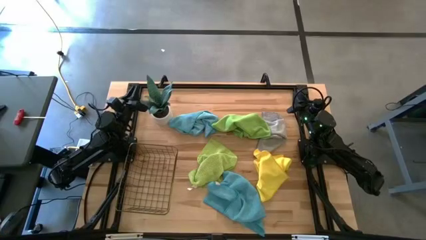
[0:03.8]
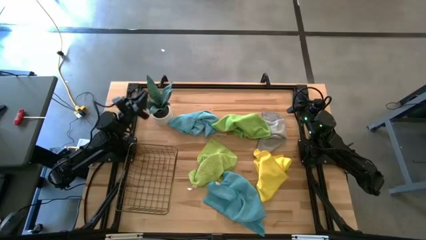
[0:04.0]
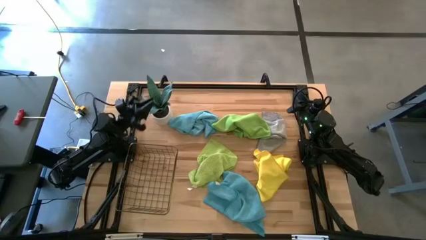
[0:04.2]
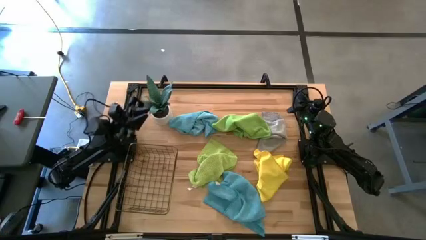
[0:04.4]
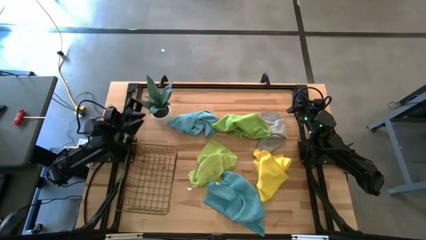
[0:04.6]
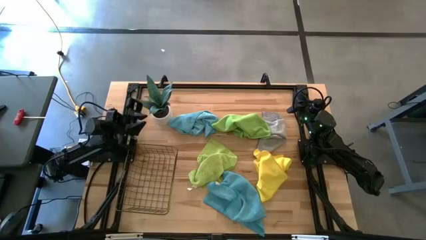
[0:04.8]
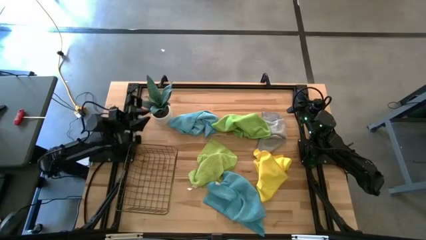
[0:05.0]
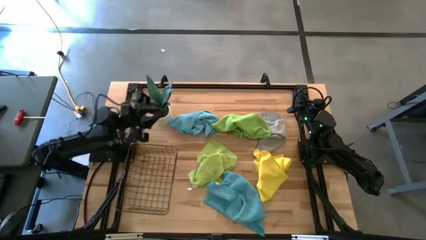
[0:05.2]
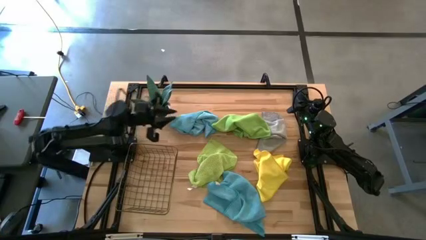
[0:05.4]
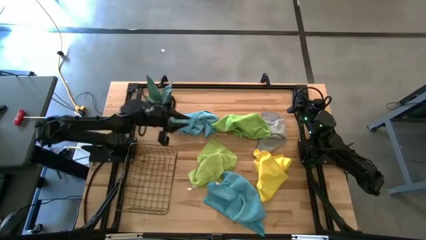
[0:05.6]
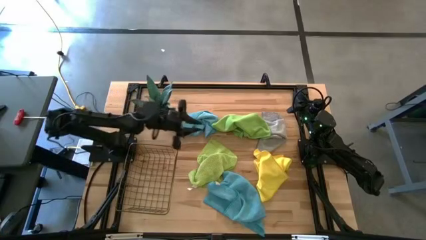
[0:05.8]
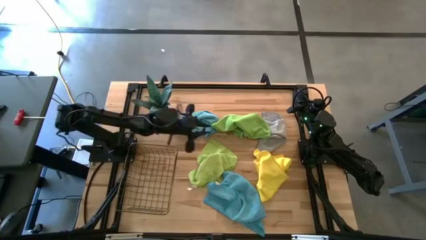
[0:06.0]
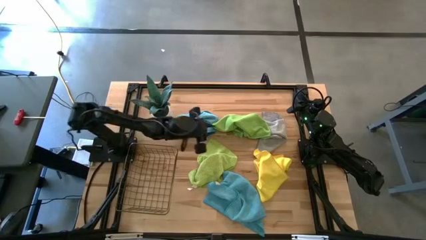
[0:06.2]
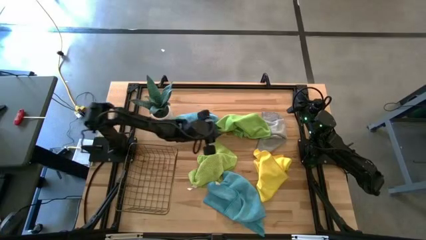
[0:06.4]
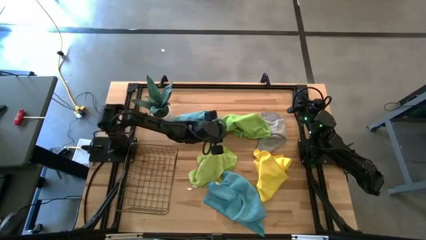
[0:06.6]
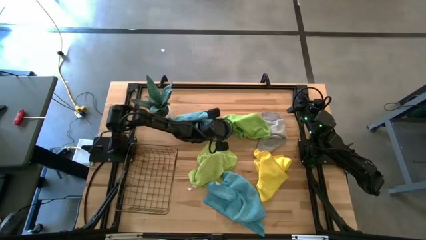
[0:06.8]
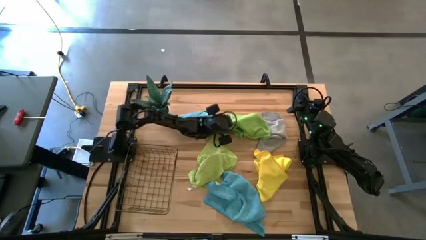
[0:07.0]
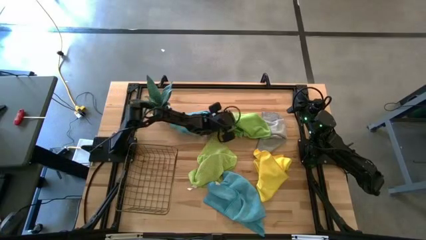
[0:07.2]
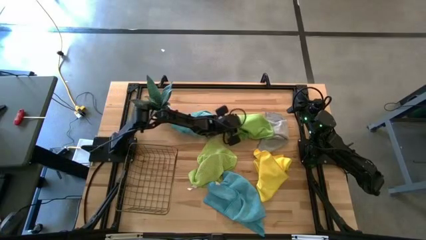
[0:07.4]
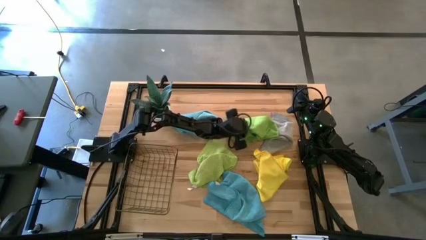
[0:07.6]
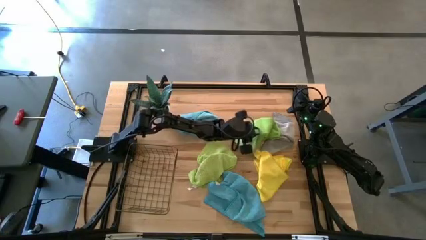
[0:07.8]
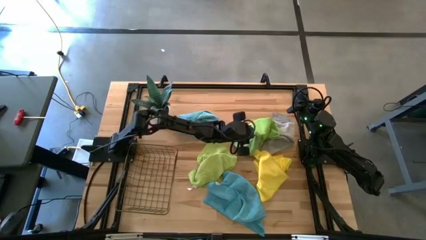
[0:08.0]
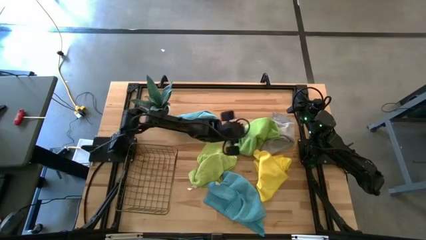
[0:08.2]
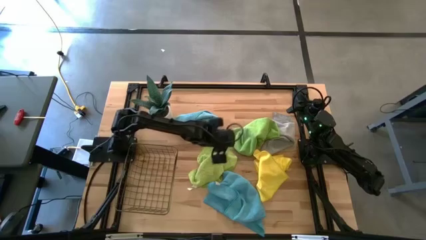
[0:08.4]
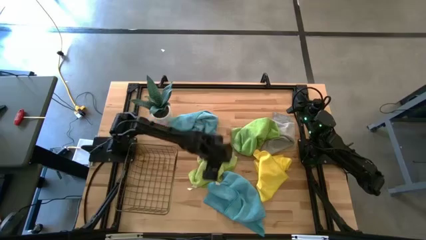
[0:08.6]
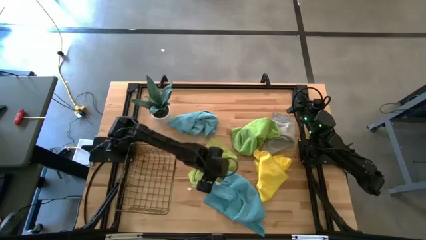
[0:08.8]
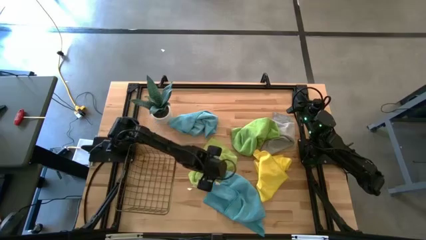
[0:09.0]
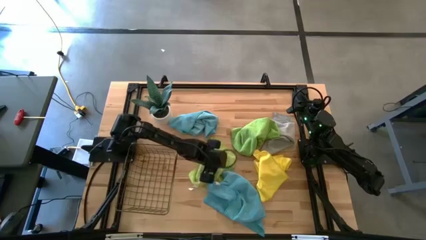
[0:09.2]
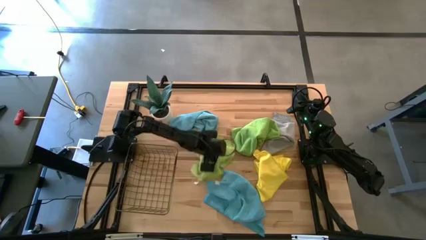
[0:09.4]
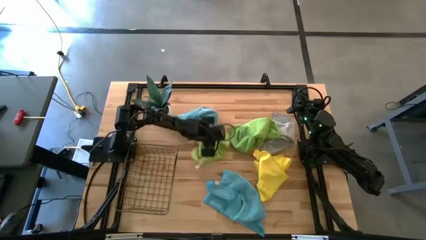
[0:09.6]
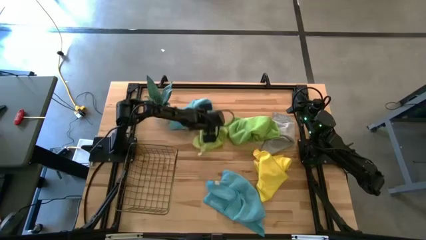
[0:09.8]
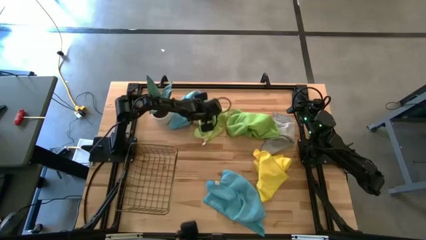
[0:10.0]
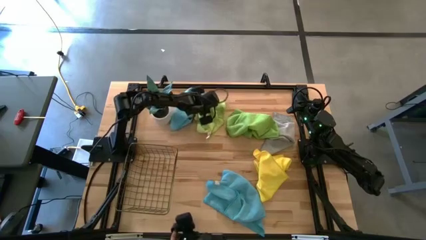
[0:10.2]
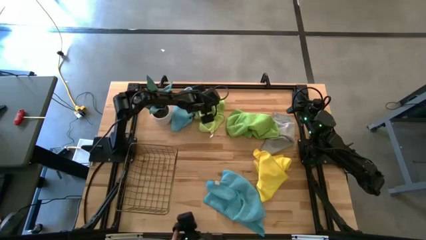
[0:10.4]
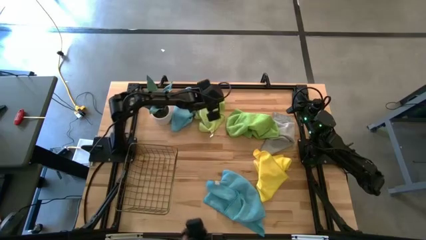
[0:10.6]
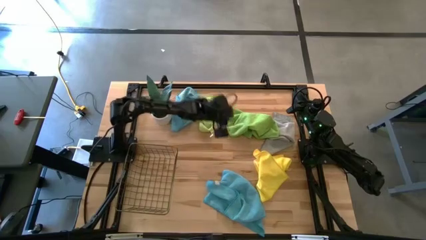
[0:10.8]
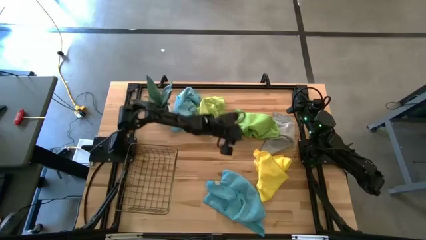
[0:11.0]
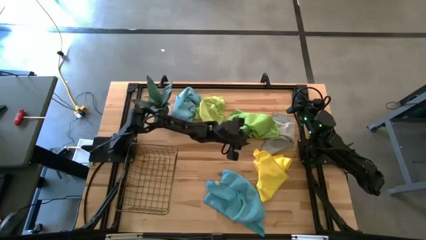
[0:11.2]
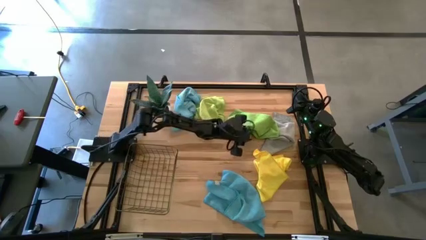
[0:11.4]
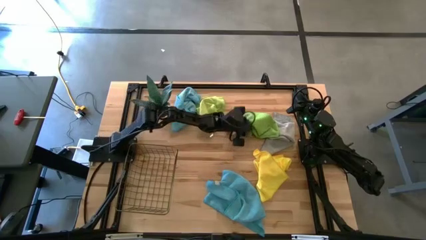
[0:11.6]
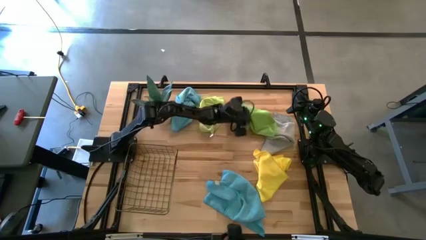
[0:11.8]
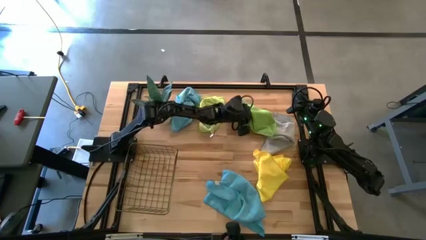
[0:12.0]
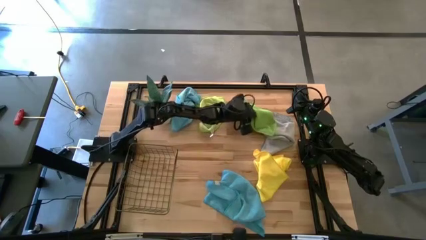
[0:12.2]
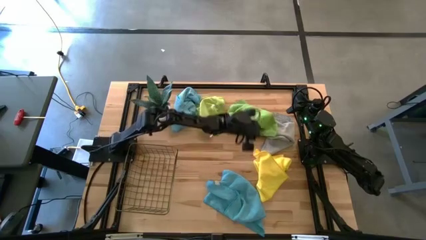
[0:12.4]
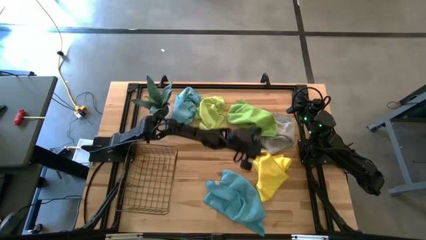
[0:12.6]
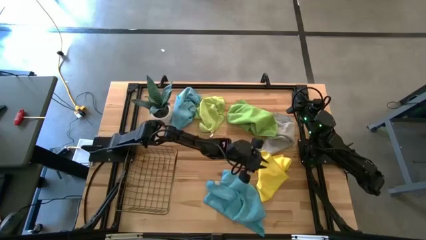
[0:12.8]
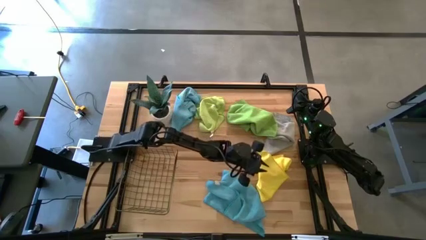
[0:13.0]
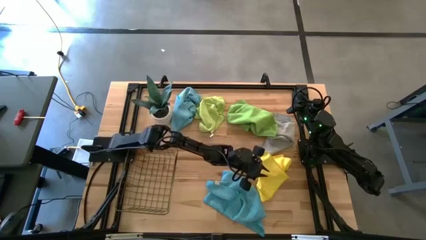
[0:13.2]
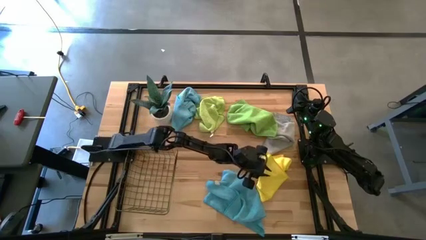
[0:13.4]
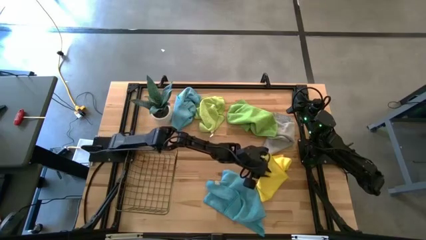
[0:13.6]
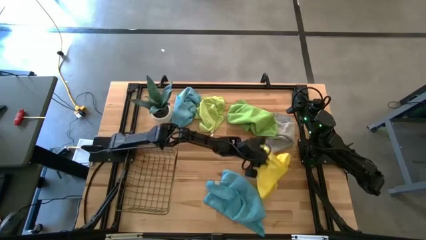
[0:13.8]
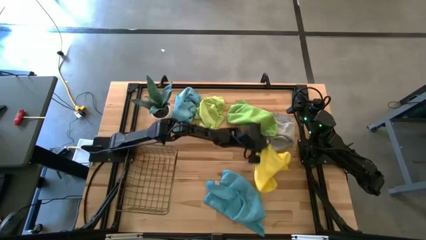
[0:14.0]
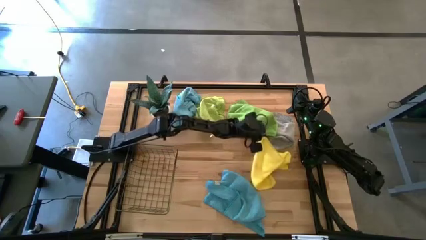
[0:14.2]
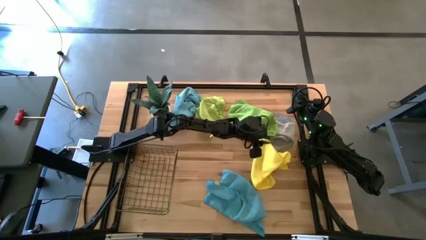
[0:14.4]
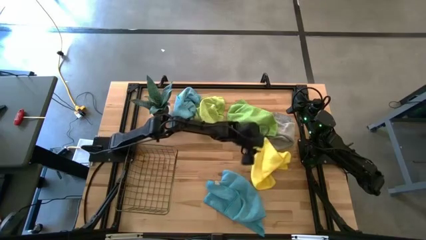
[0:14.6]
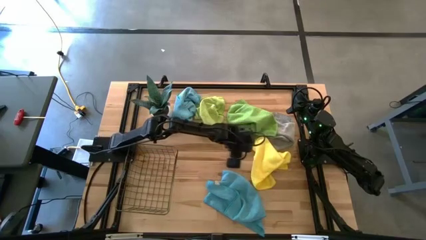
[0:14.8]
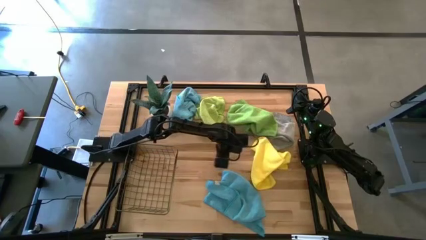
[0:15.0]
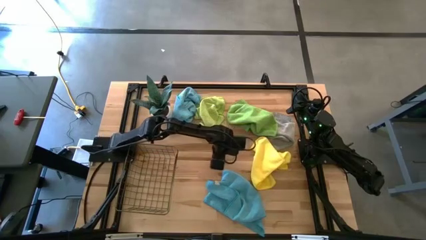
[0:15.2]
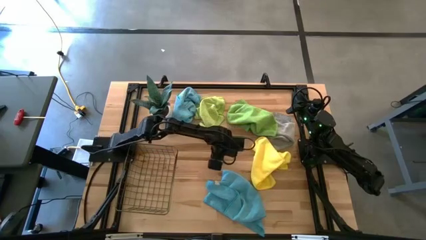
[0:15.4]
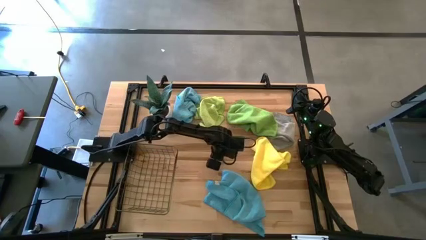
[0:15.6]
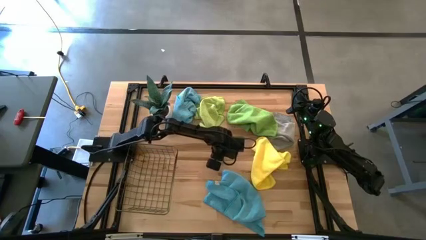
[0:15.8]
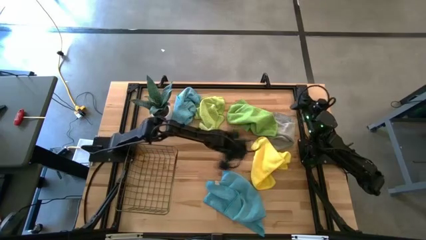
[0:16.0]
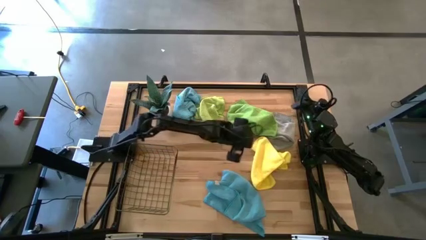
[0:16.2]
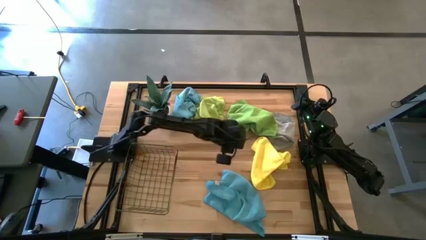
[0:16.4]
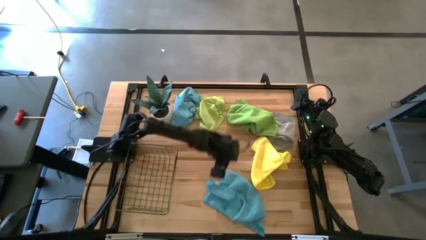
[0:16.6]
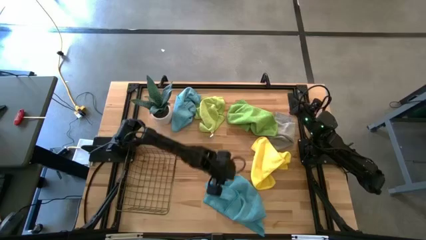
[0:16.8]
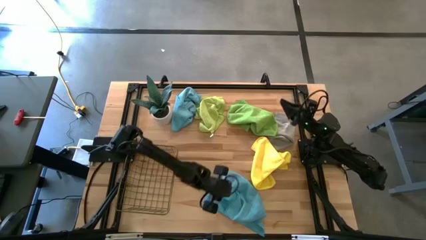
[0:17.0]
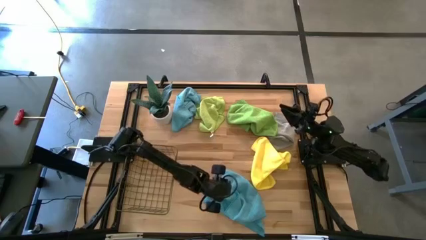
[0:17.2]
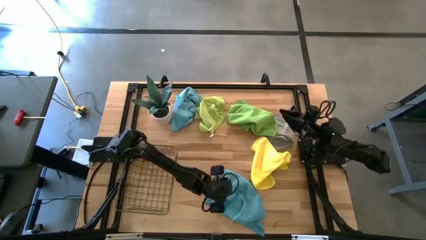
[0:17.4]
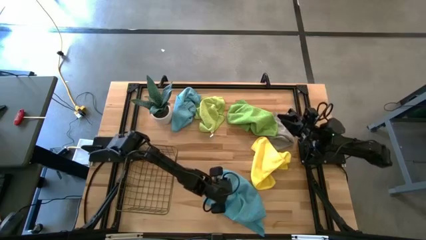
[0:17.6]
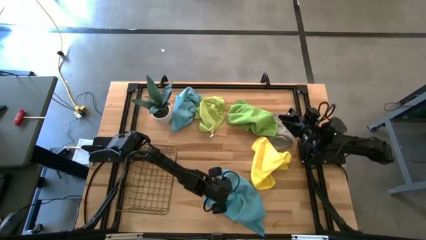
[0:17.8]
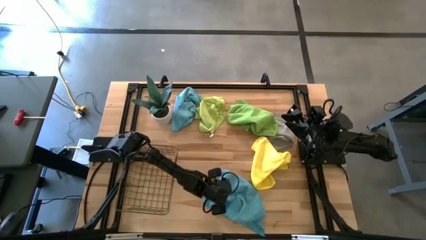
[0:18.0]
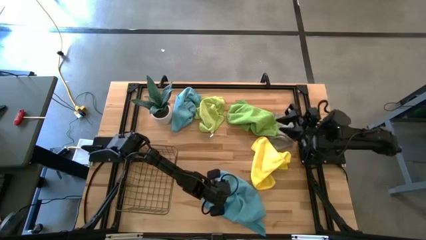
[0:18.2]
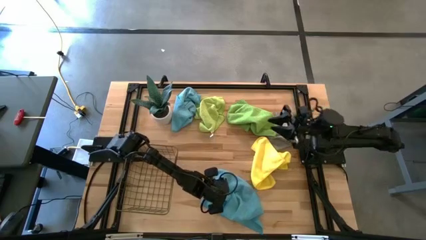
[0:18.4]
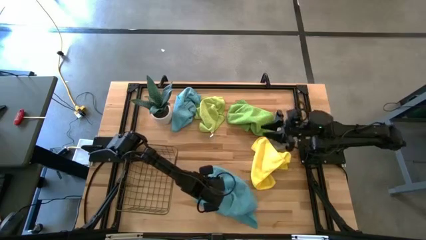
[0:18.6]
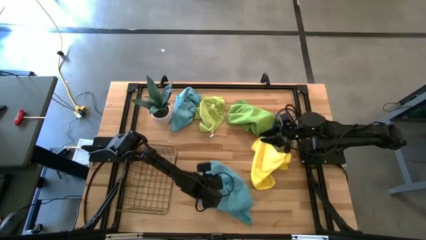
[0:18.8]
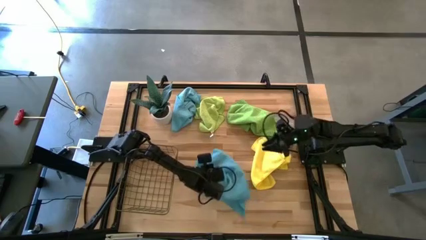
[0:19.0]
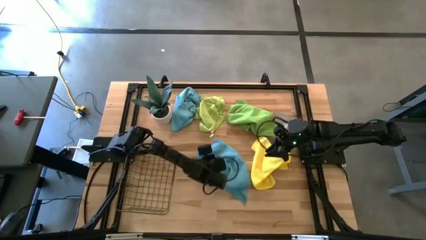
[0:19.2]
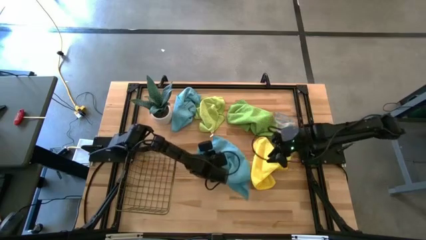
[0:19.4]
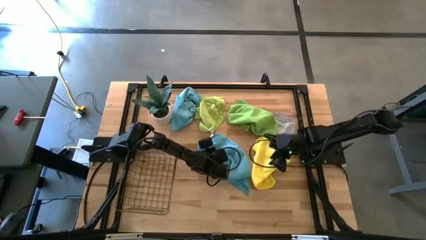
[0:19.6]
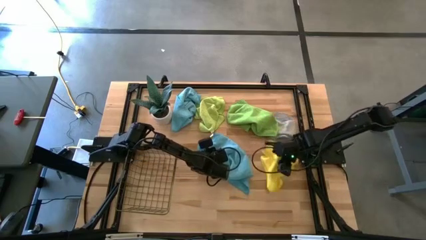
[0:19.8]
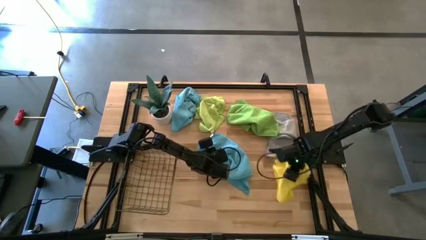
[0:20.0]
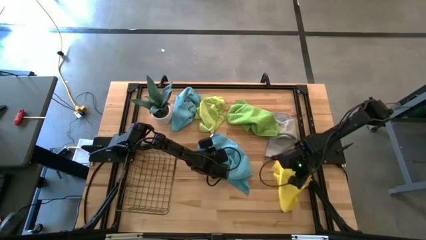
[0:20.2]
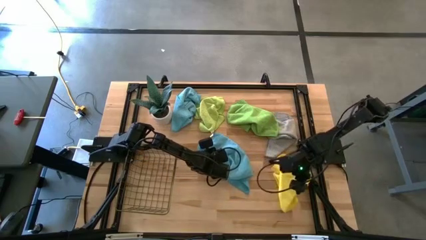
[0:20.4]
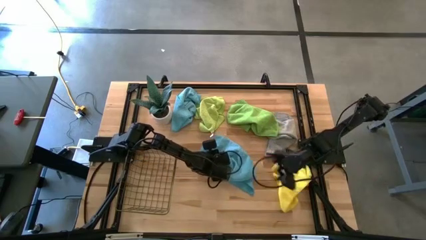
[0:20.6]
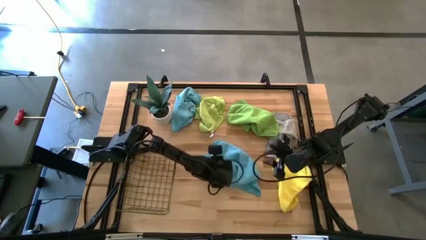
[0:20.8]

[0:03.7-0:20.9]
Task: Fold microfiber towels
Prepare the table to fold the microfiber towel
